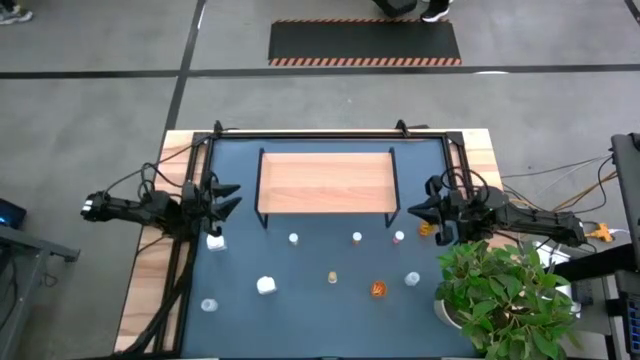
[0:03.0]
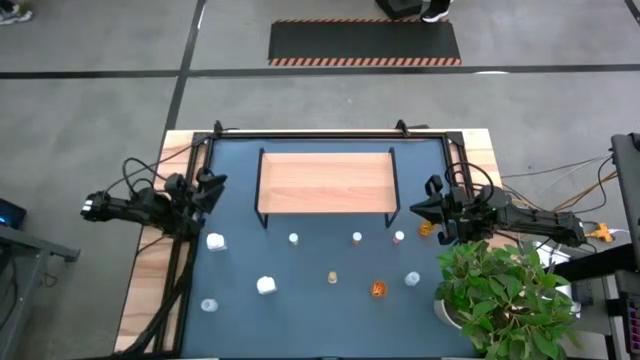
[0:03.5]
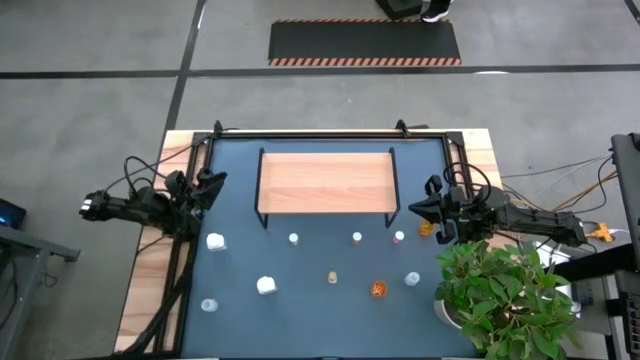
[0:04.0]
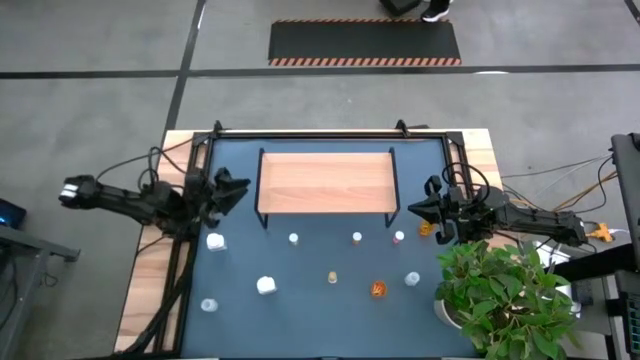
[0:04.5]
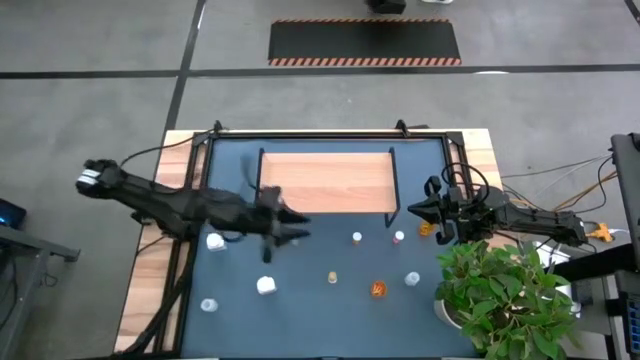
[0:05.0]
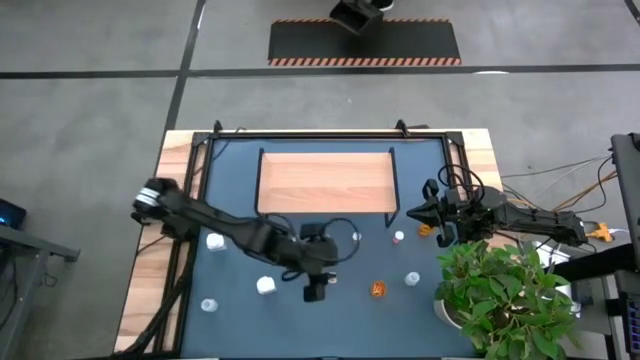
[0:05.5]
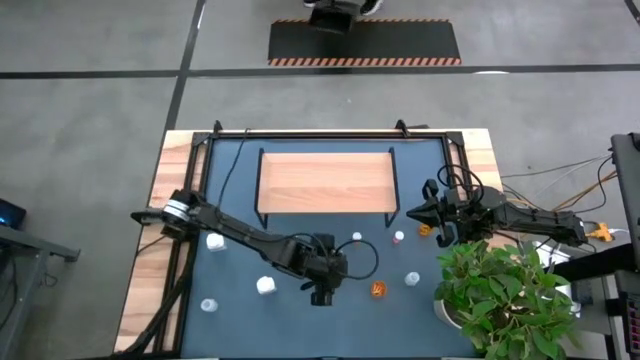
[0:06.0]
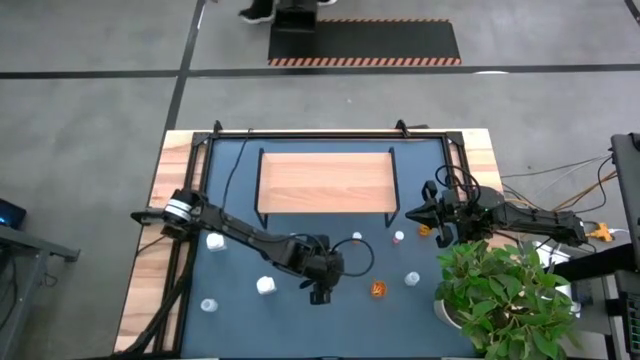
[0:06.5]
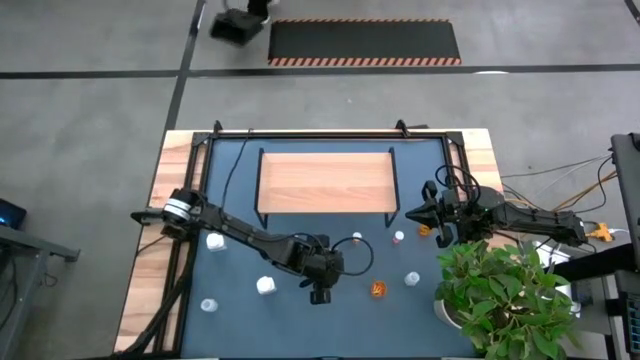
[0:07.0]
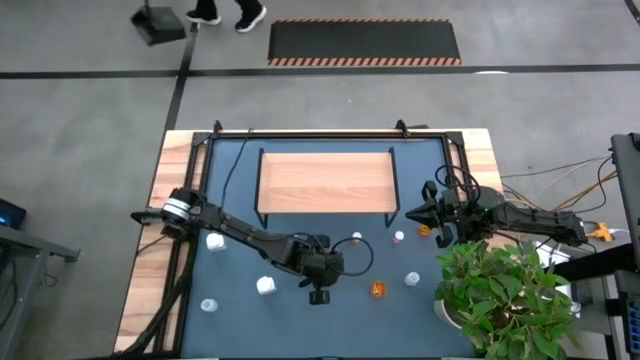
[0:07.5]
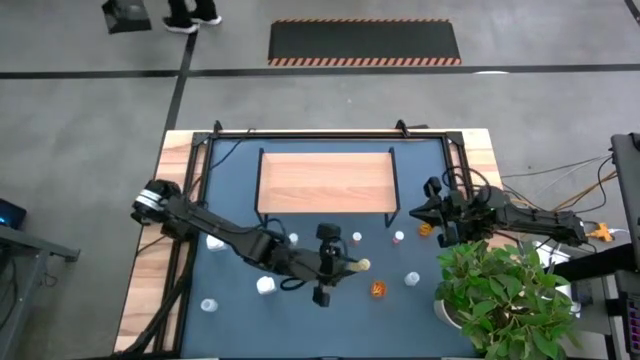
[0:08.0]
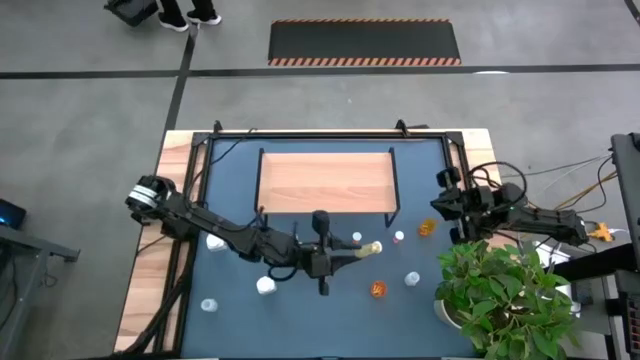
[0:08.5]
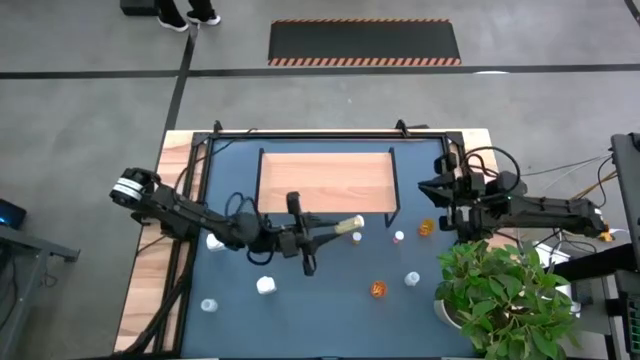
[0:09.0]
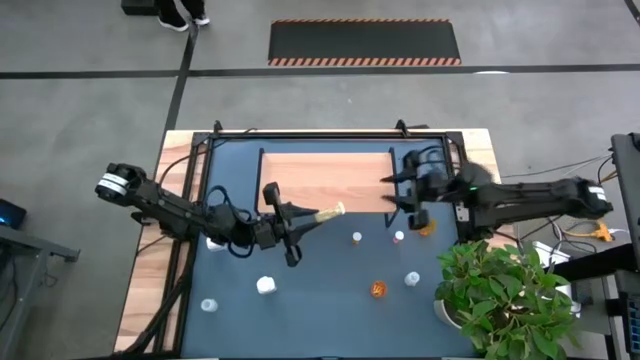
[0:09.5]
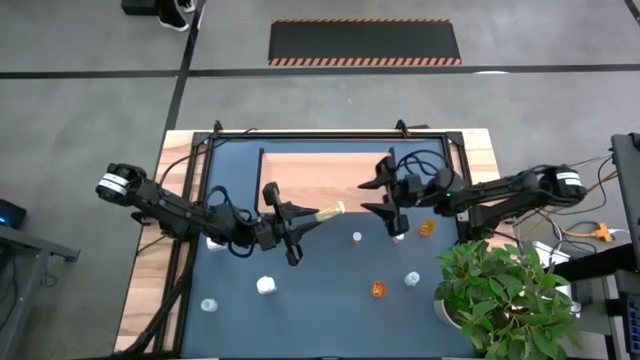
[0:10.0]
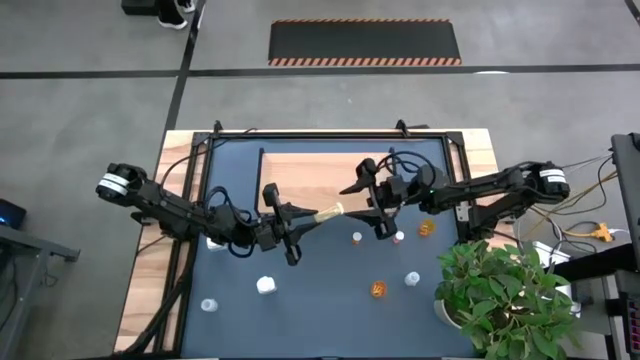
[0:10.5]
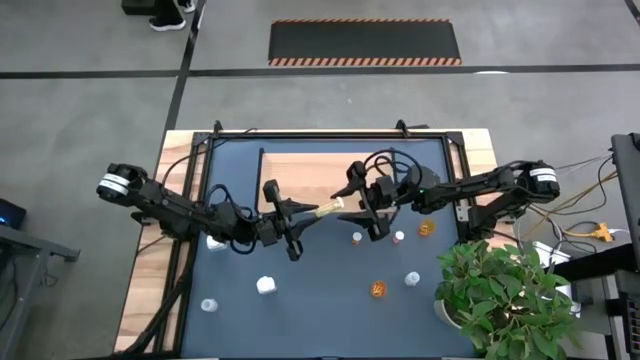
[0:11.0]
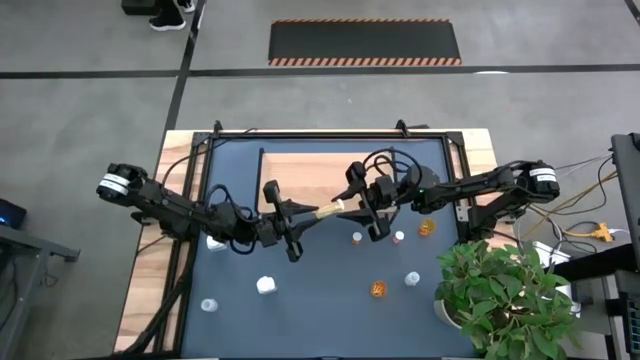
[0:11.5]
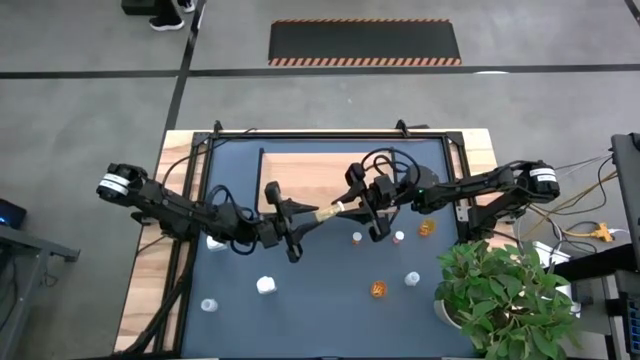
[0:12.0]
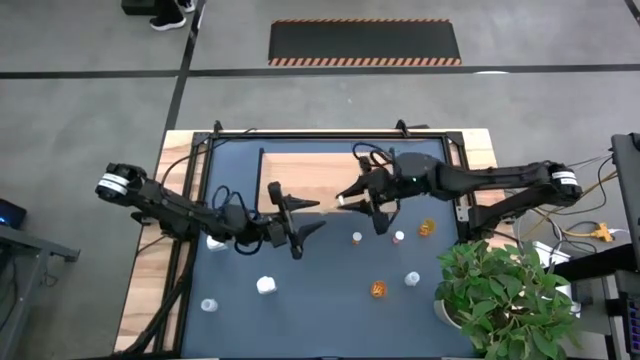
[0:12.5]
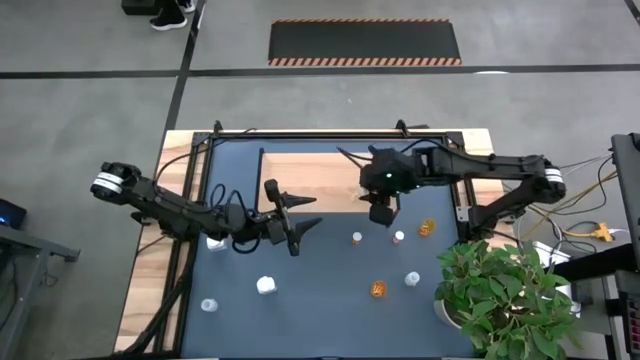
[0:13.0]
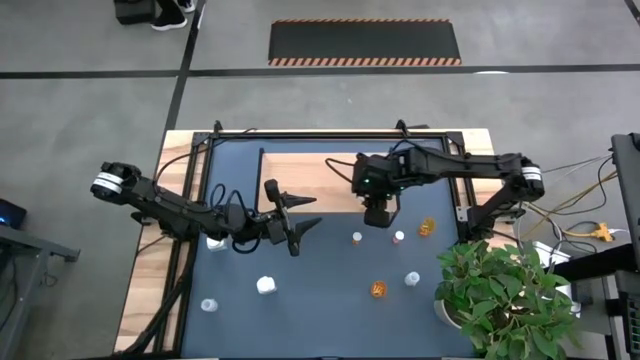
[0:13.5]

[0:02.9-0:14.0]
Task: Pick and place medicine bottles onto shelf by color
Put the bottom yellow bottle on the shelf

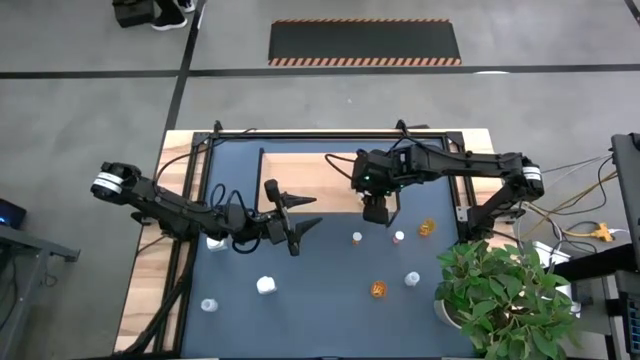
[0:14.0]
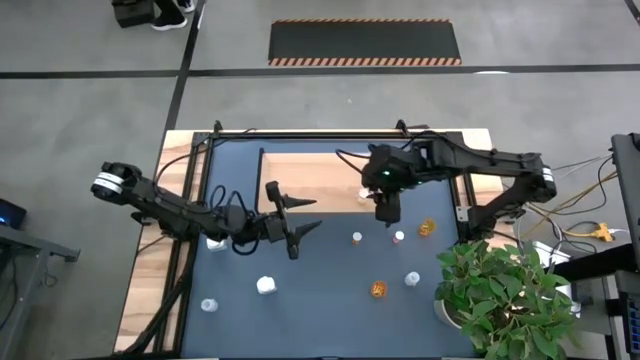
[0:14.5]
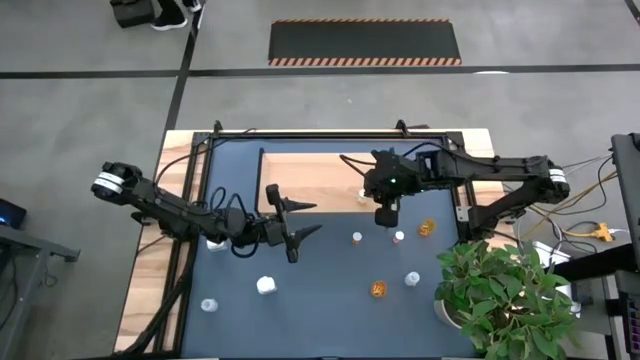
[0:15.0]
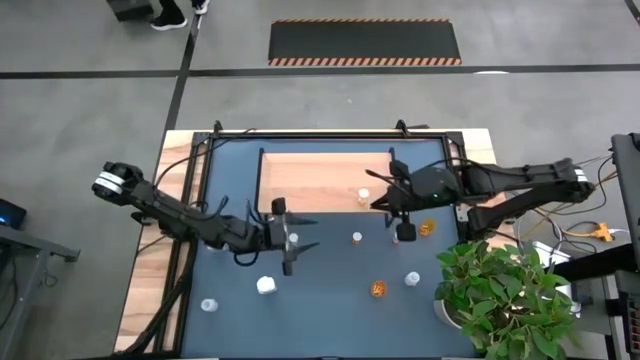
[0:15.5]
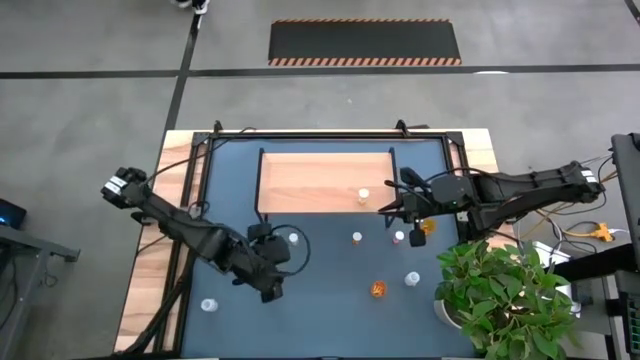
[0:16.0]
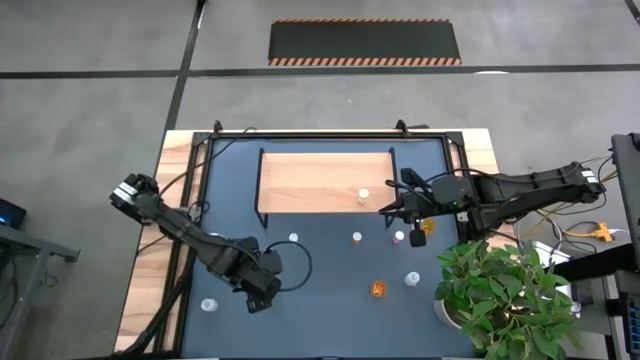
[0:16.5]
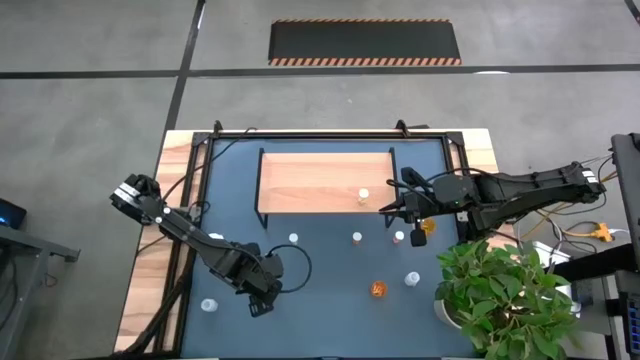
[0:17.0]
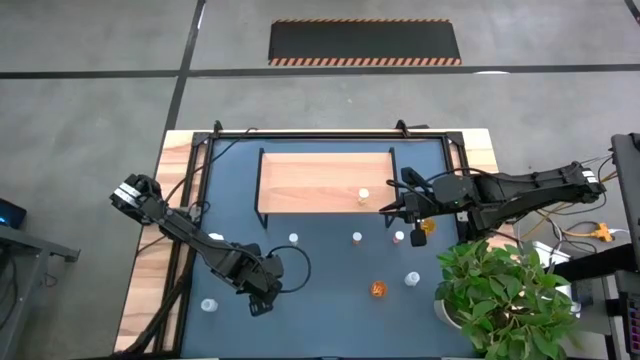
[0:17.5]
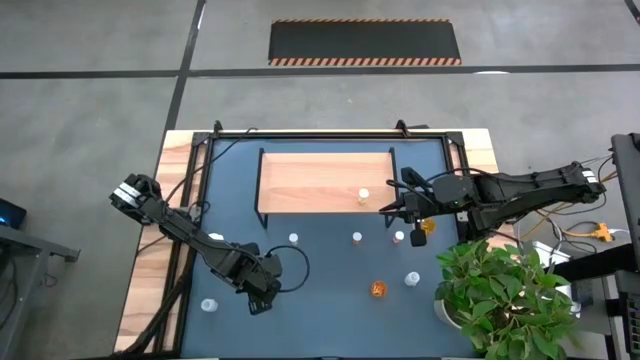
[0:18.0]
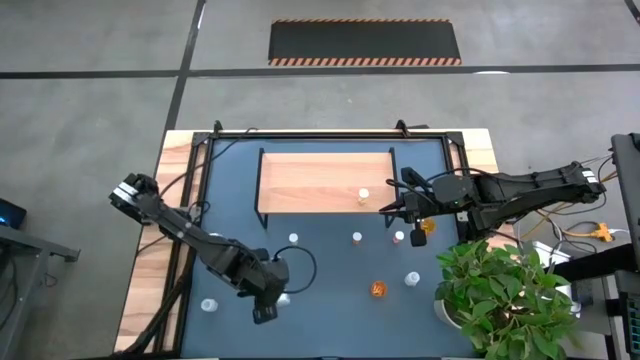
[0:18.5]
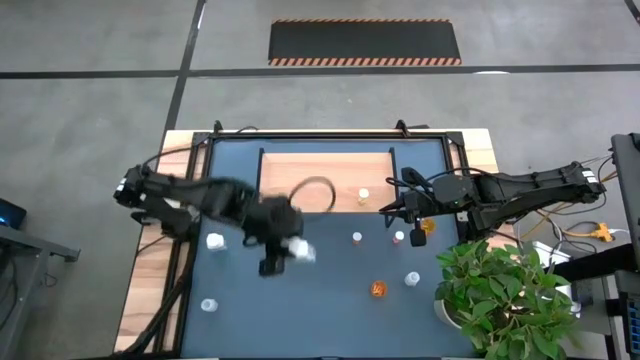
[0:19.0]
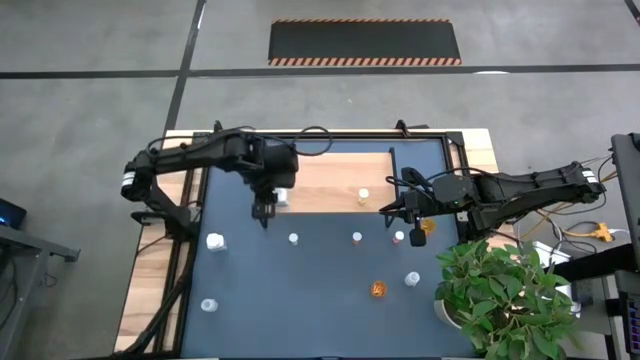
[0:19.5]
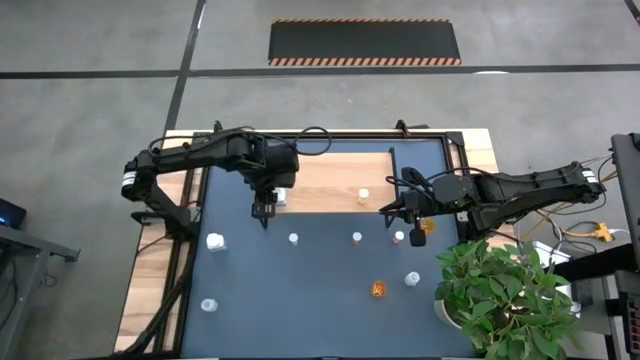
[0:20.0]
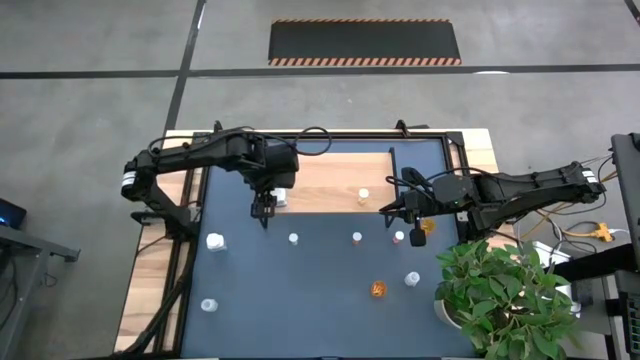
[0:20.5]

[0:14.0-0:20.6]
Put the bottom white bottle on the shelf

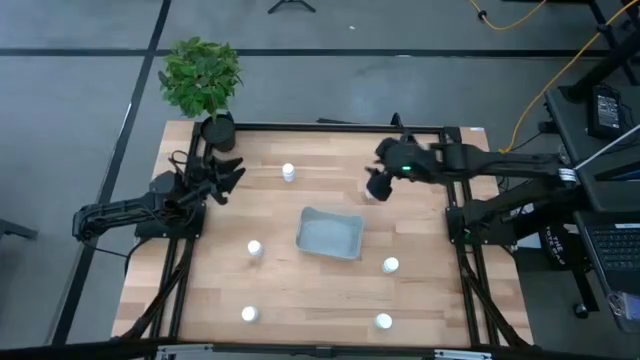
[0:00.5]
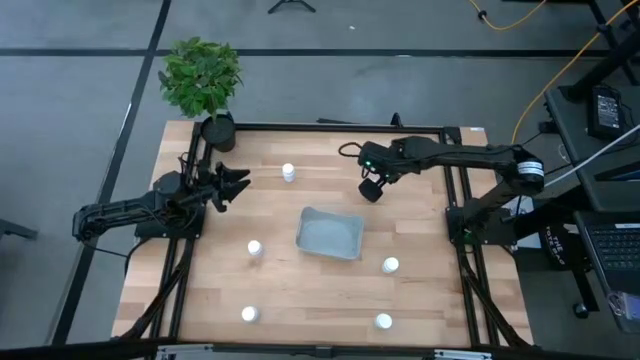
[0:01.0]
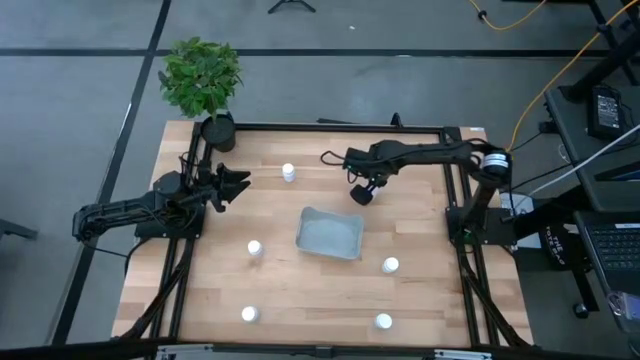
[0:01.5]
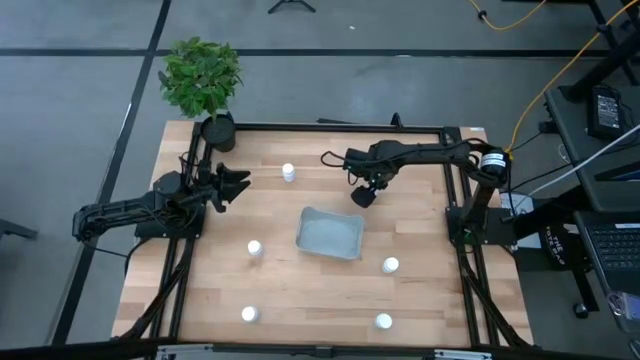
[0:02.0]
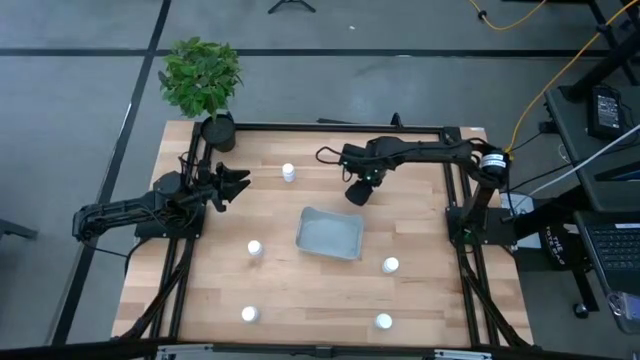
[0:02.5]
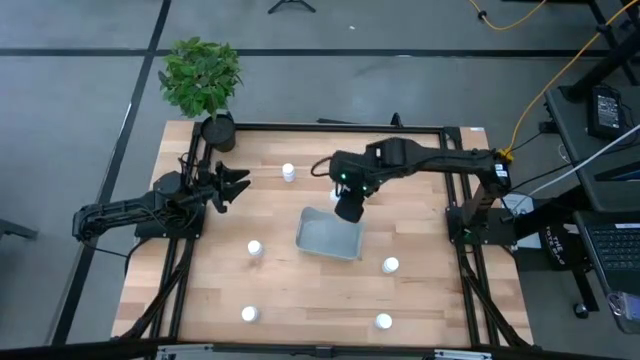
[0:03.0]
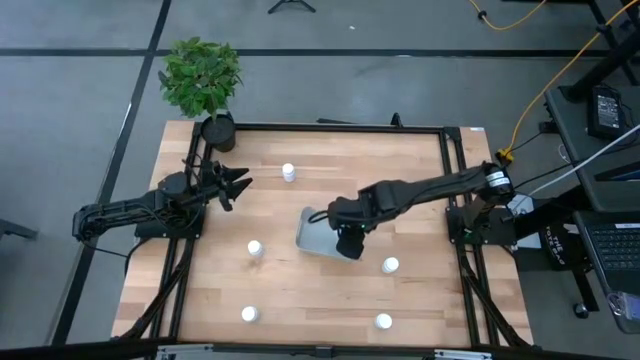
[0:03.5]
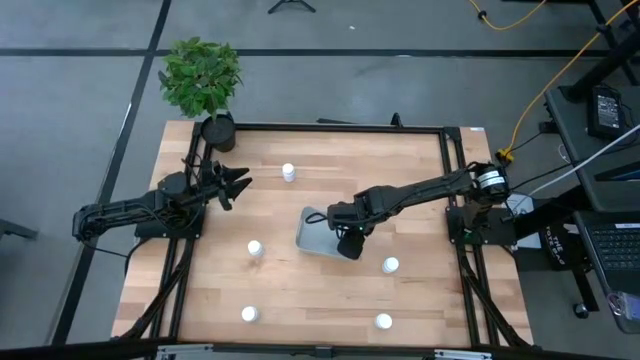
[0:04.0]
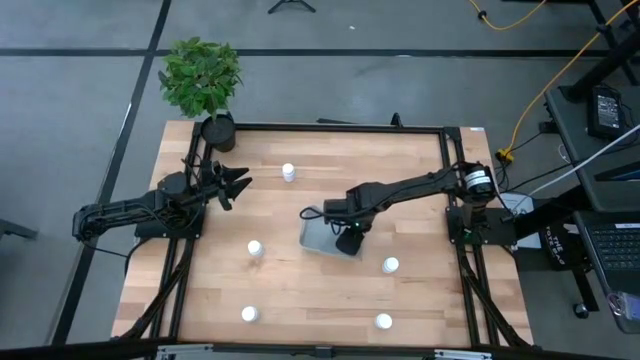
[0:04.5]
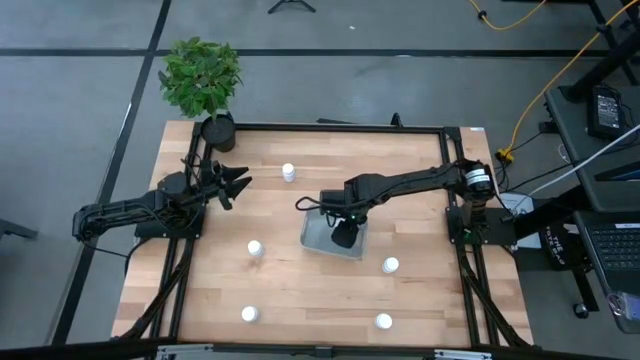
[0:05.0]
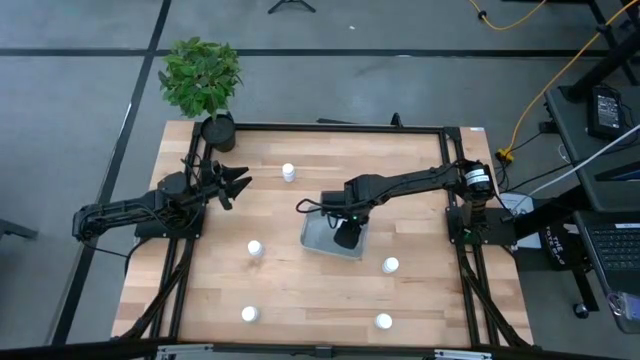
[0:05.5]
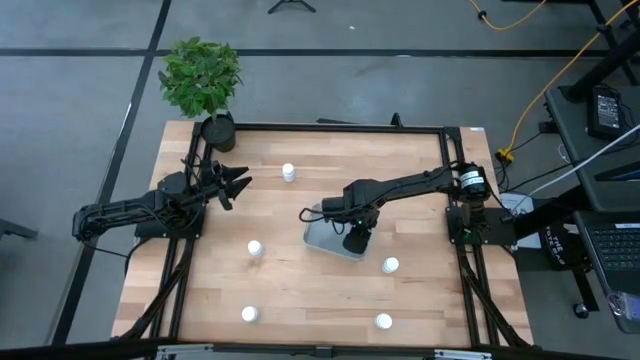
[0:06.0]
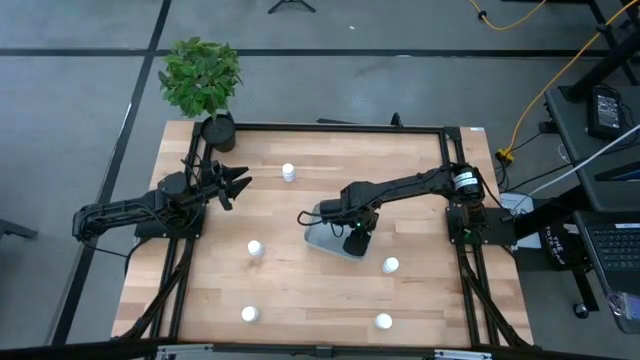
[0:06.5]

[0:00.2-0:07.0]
Task: Pick and place pill bottles into a basket
Put the white pill bottle into the gray bin
